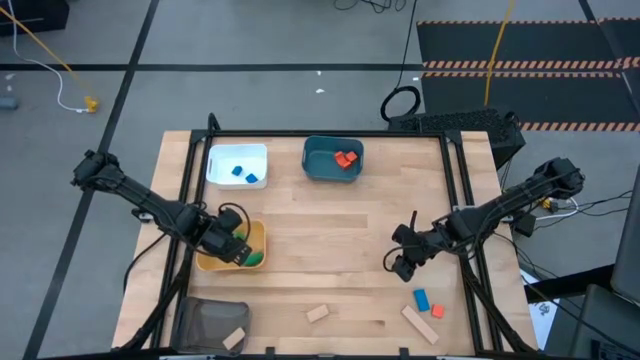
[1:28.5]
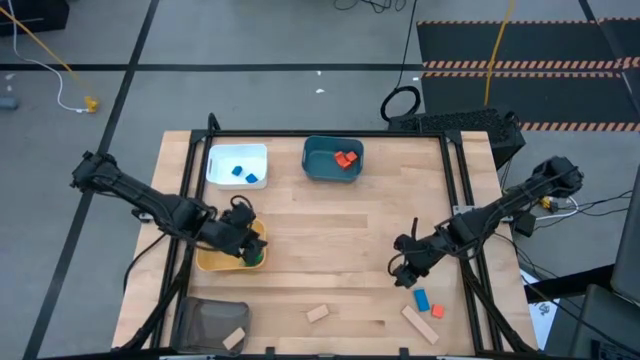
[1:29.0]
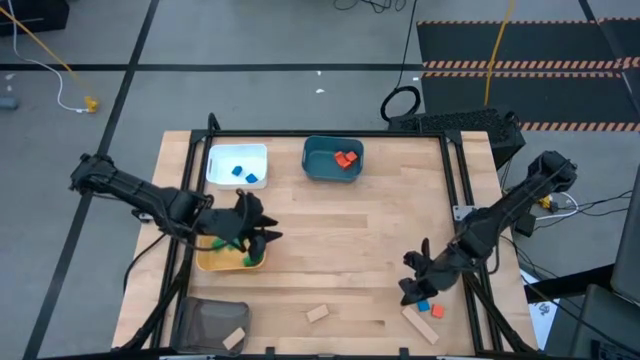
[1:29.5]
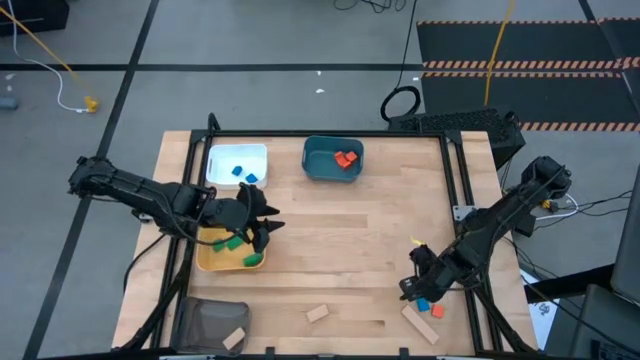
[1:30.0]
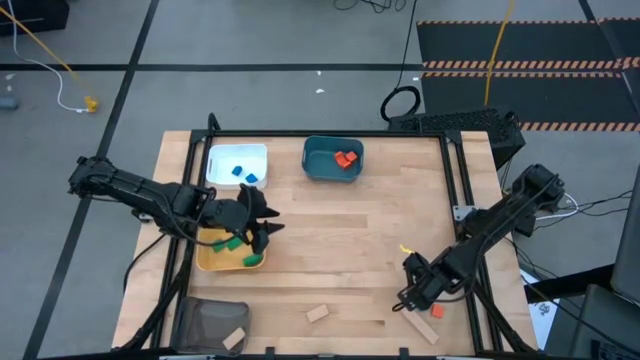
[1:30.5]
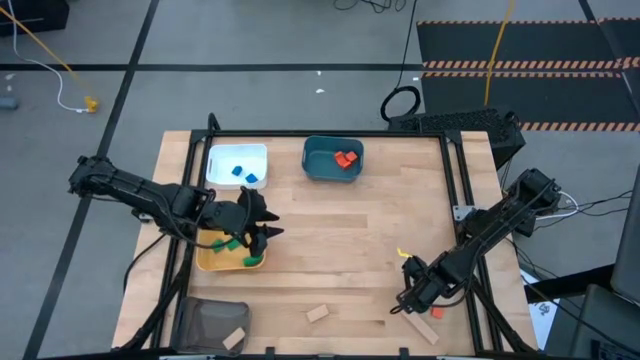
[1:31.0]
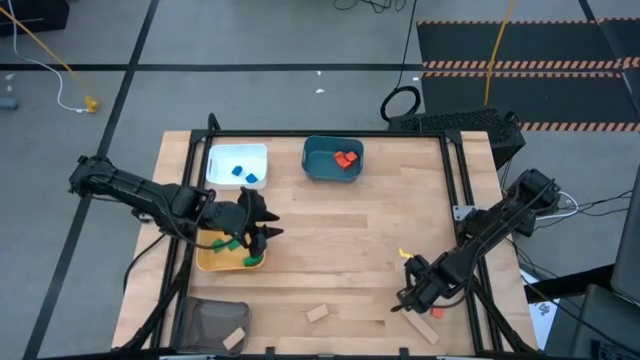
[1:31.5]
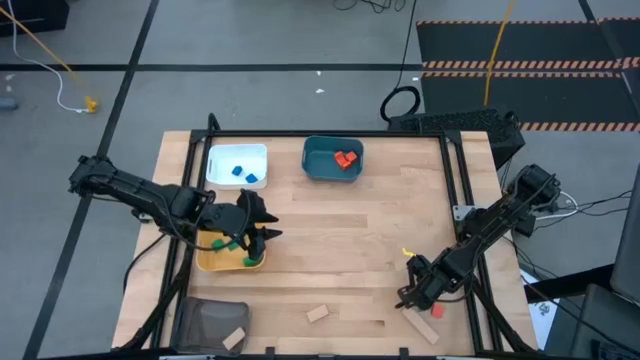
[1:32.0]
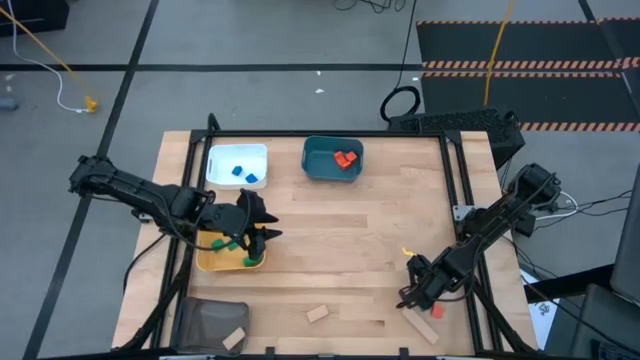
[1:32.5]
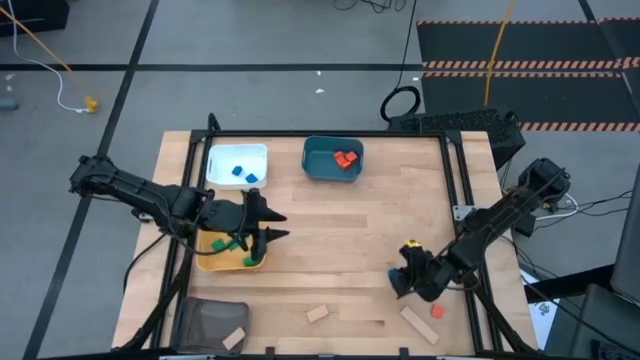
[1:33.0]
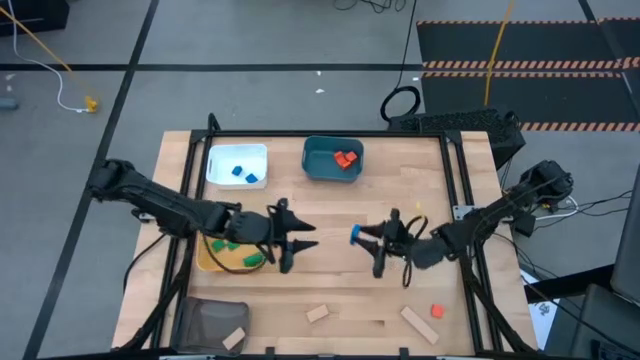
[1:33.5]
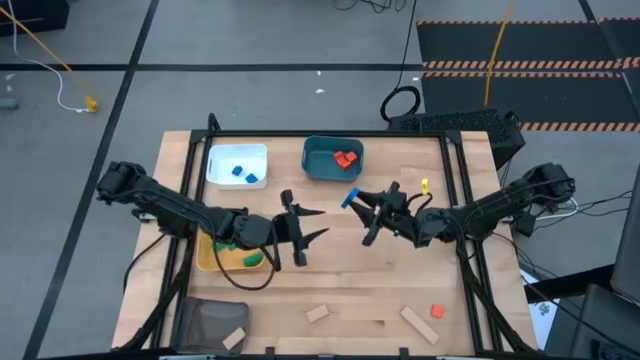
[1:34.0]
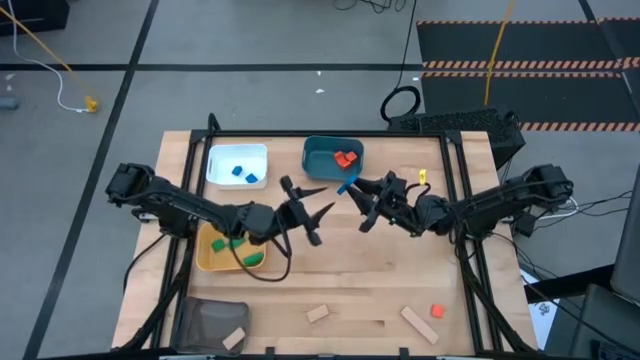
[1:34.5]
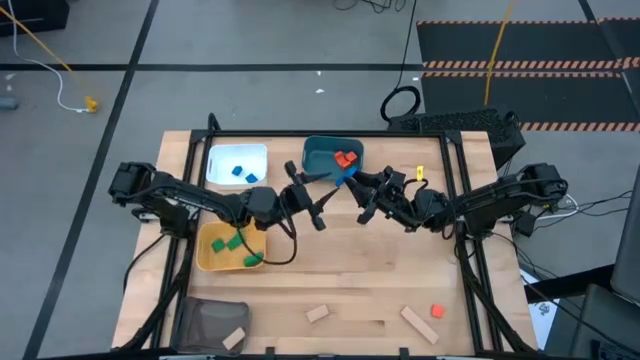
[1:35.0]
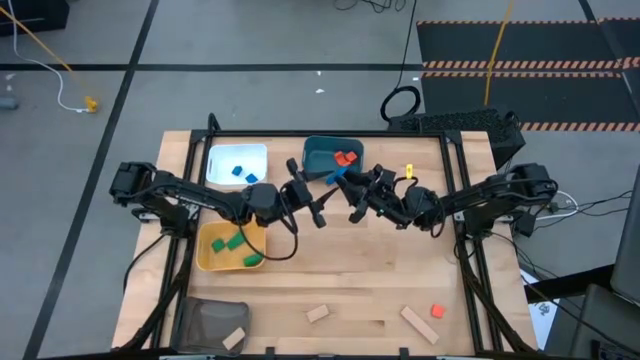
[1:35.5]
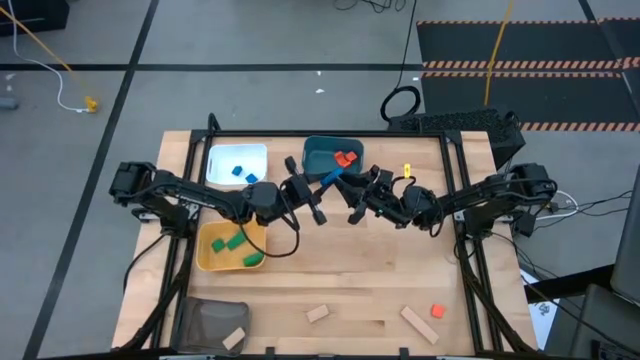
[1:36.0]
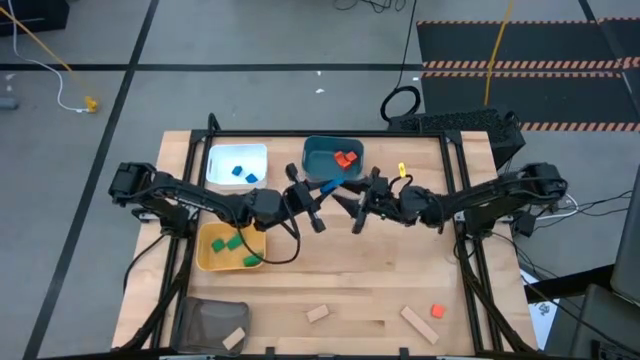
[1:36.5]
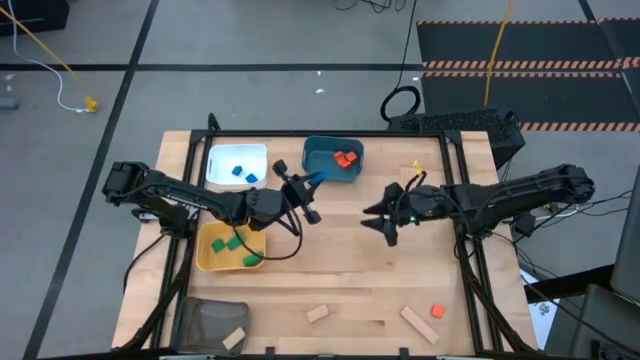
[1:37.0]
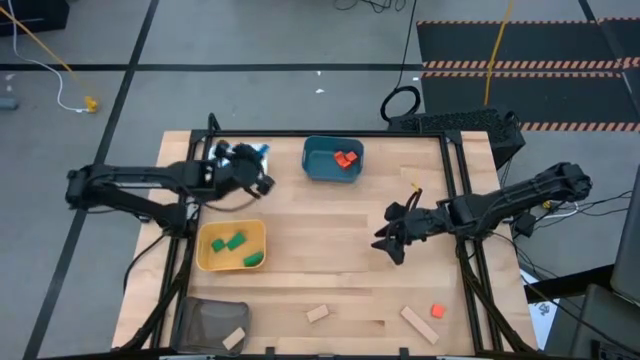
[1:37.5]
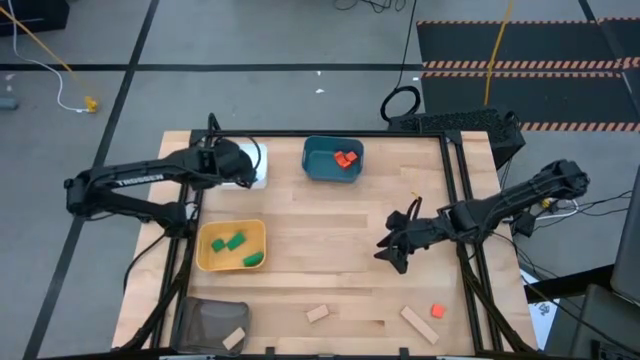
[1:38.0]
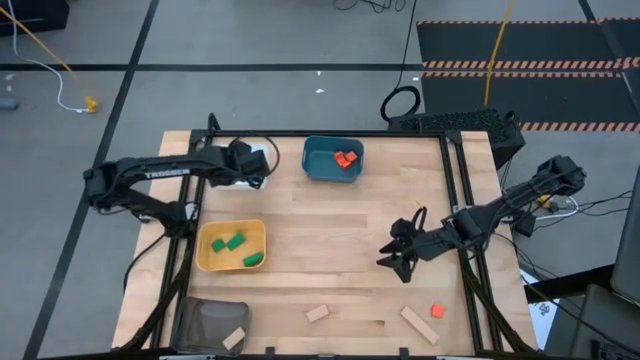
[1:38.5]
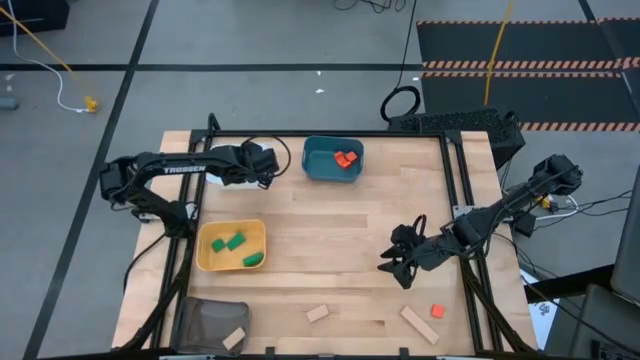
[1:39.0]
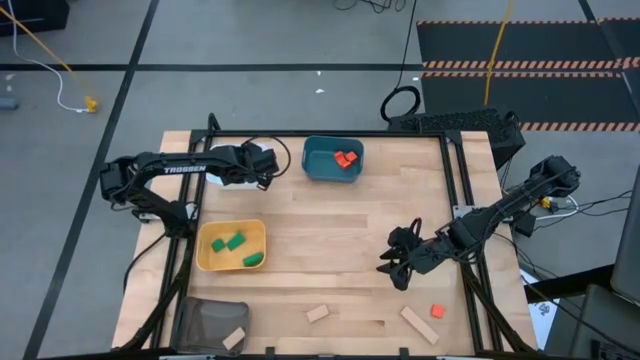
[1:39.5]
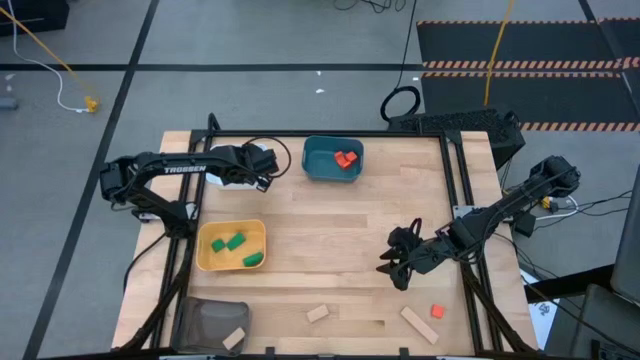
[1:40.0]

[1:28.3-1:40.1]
Task: Sort & place blocks by color
Put the blue wooden block into the white bin

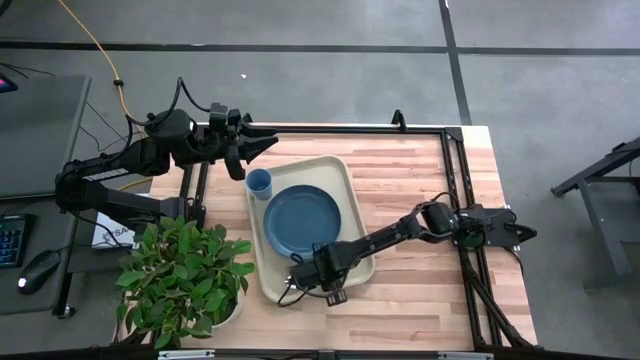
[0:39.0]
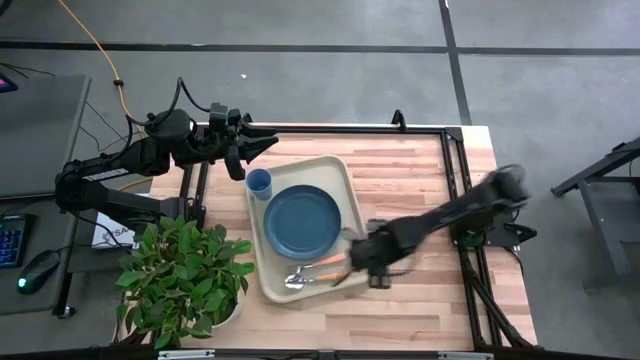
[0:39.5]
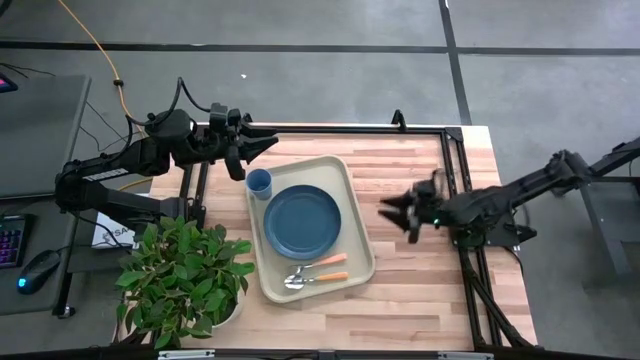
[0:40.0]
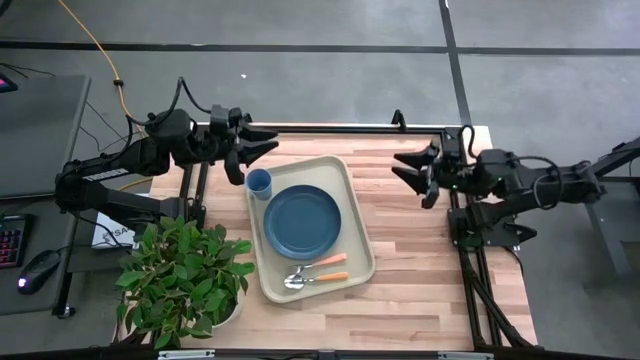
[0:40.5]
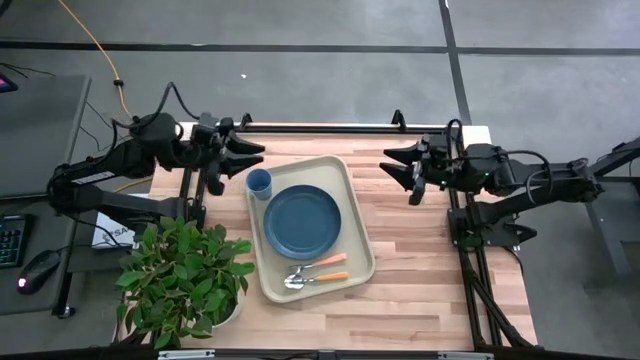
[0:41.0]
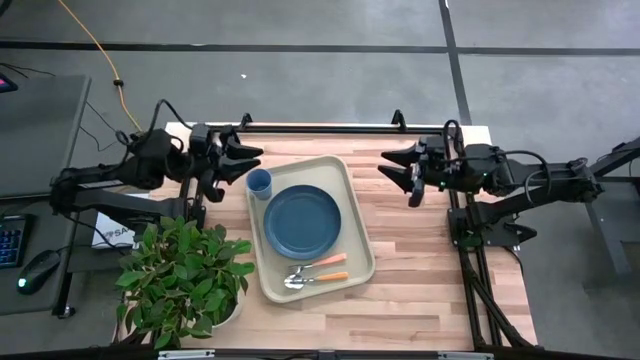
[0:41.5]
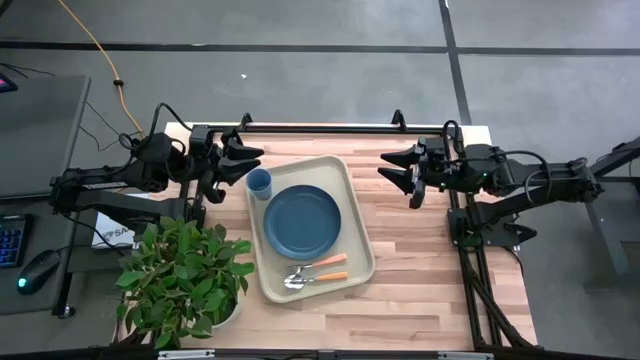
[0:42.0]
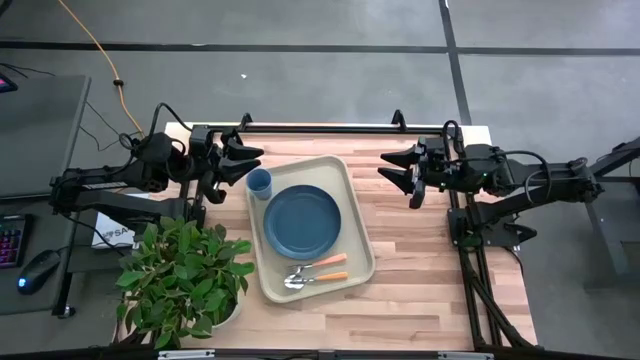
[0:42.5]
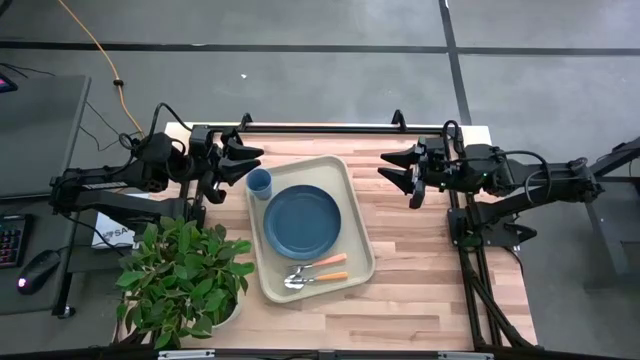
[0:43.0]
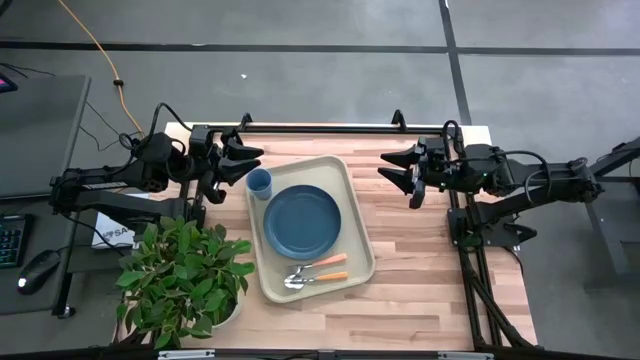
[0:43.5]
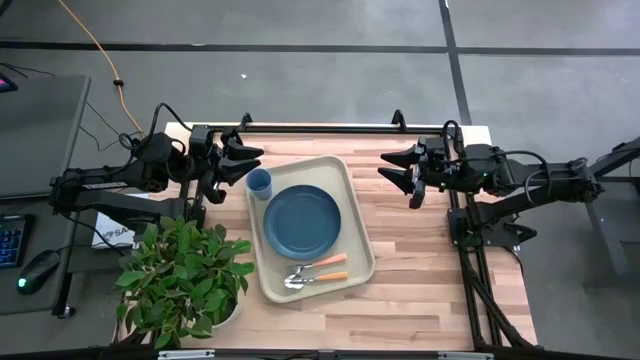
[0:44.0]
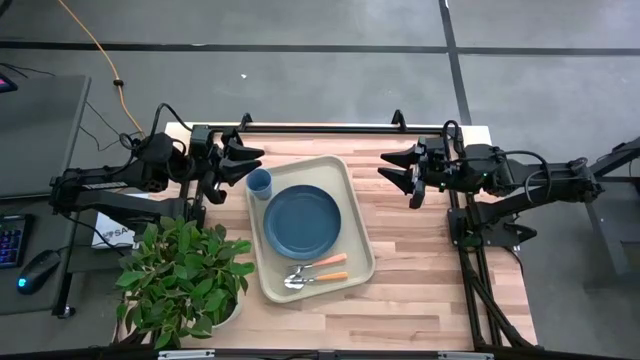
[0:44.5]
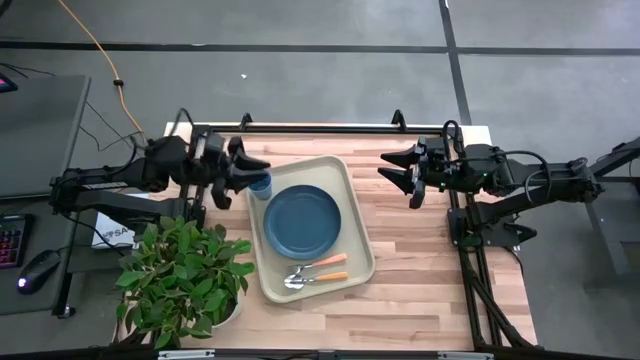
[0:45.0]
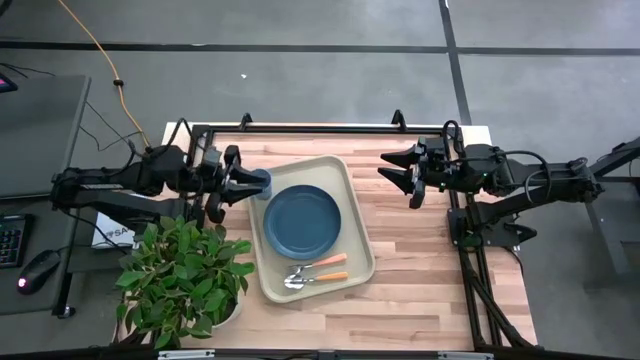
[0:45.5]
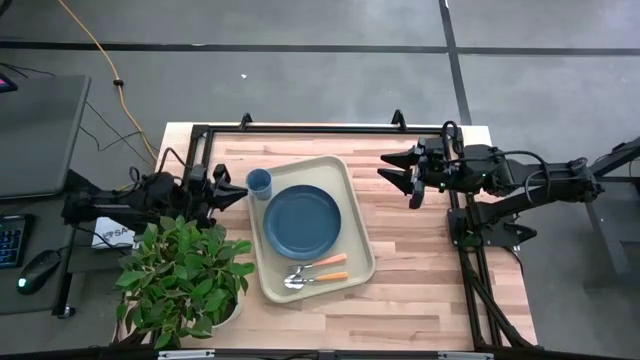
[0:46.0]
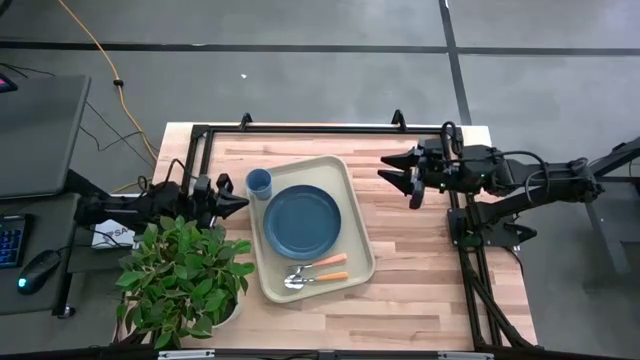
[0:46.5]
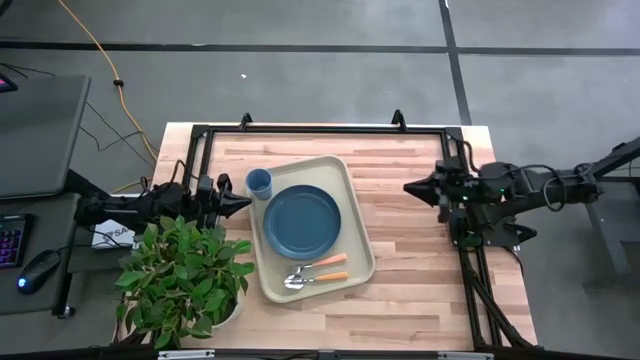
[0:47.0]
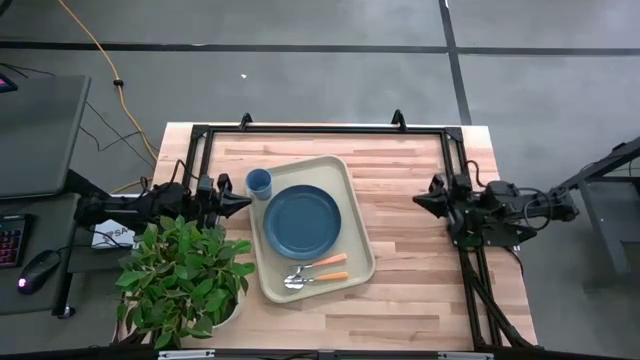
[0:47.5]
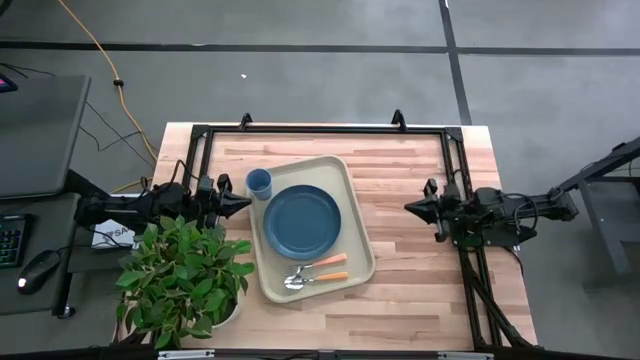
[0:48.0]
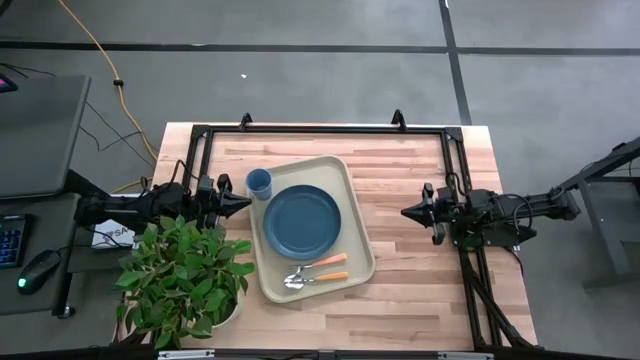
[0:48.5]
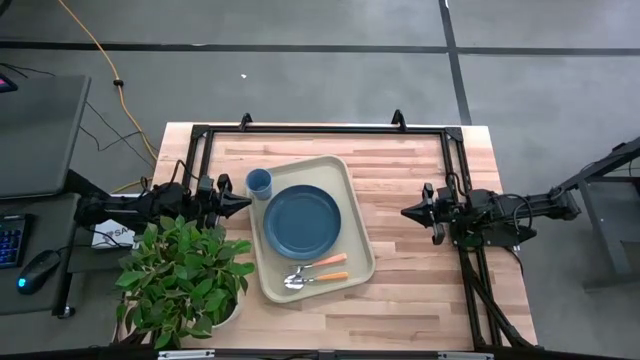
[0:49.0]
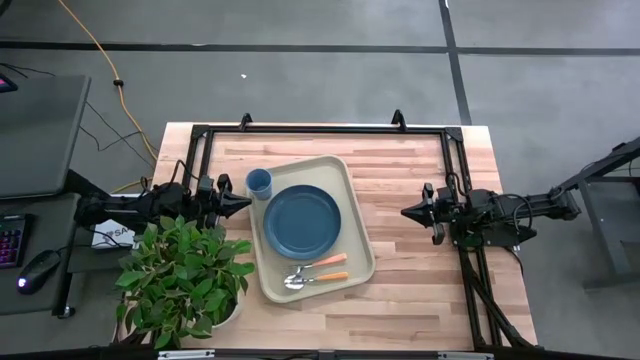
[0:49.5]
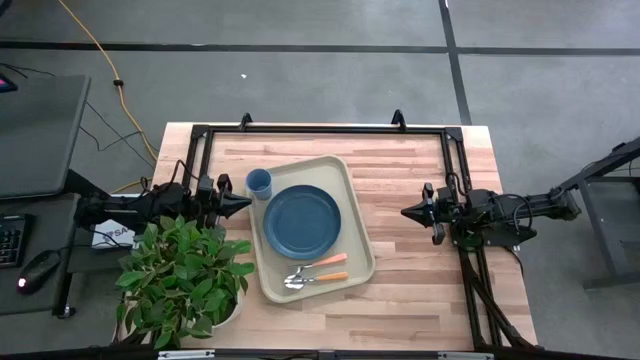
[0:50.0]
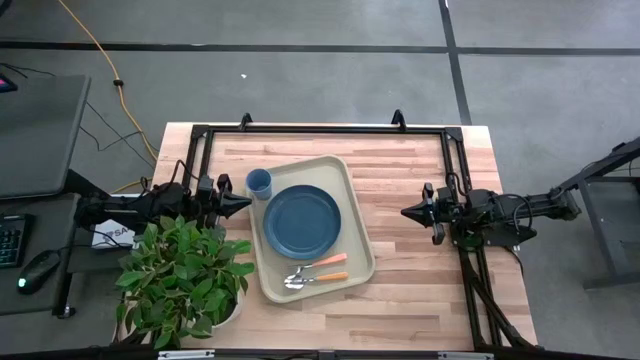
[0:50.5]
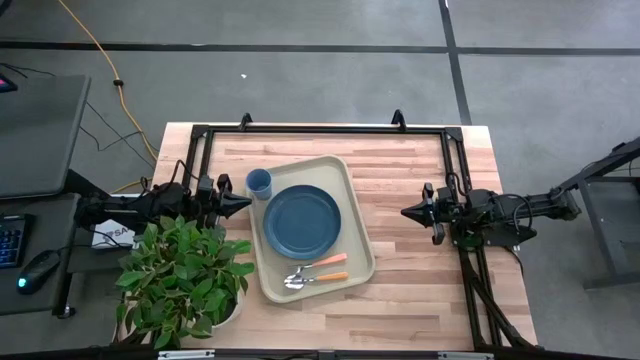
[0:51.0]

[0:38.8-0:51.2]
Task: Pick and place plate/cup/fork/spoon on tray
Return to Home Position
